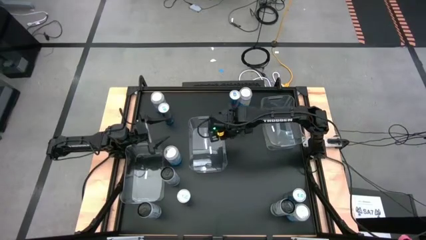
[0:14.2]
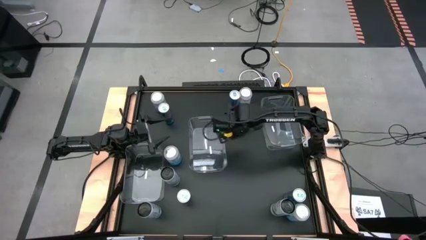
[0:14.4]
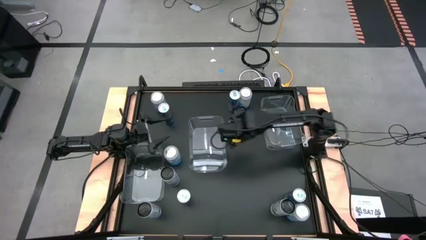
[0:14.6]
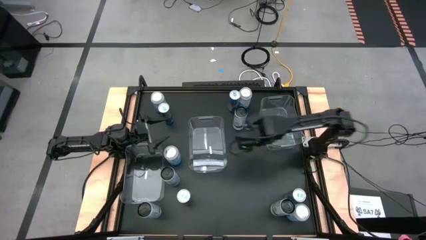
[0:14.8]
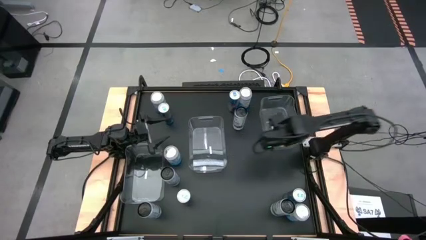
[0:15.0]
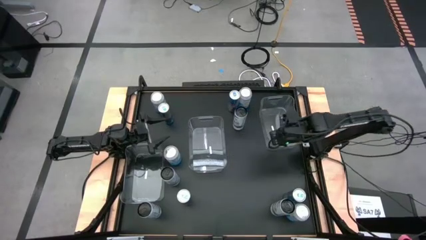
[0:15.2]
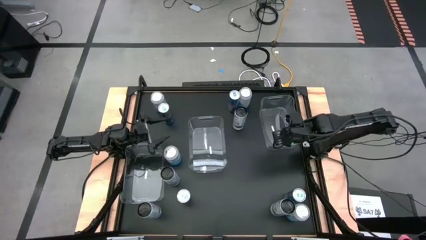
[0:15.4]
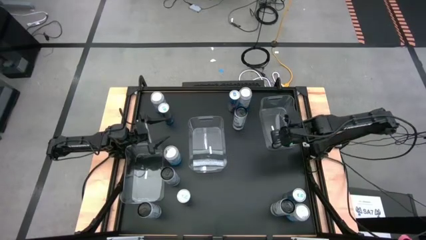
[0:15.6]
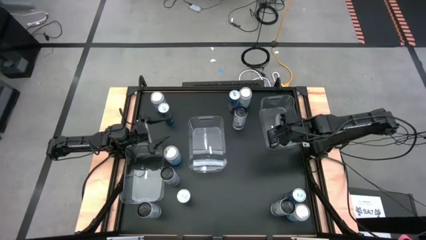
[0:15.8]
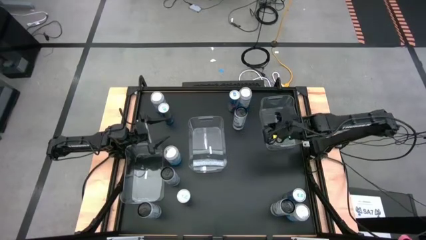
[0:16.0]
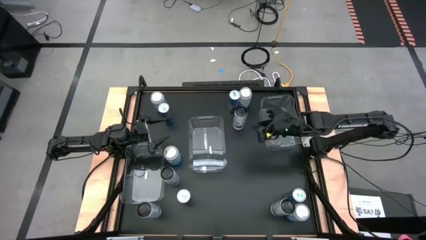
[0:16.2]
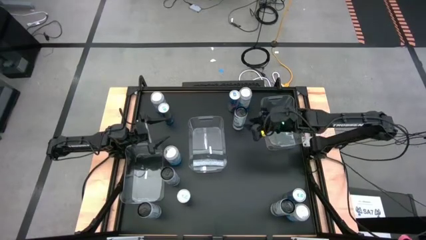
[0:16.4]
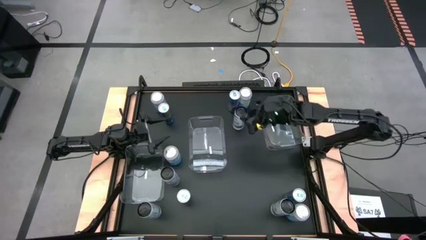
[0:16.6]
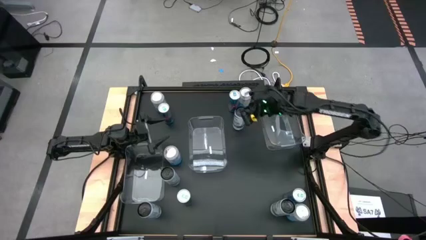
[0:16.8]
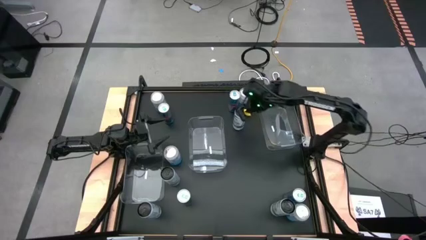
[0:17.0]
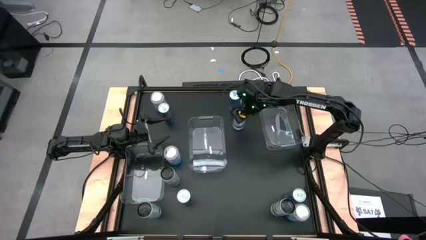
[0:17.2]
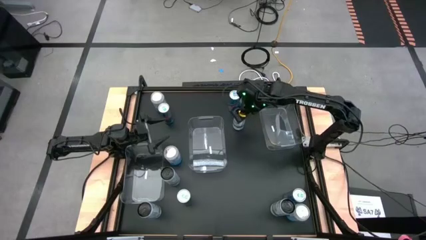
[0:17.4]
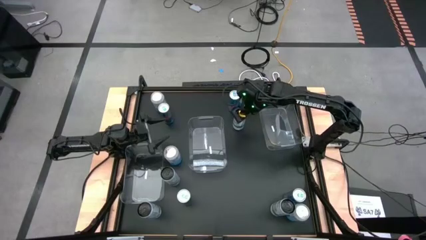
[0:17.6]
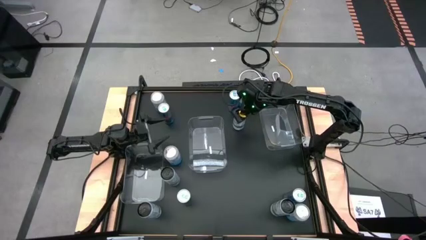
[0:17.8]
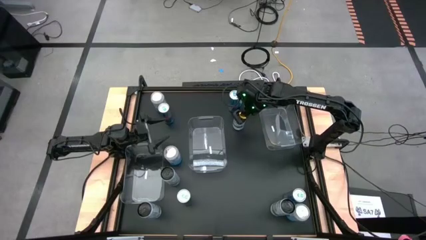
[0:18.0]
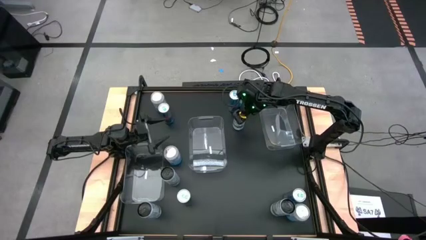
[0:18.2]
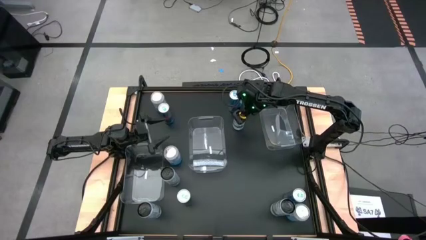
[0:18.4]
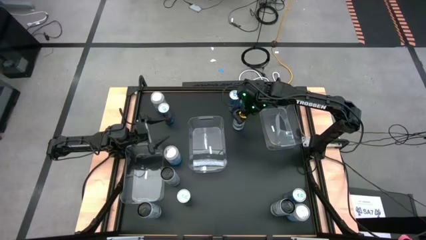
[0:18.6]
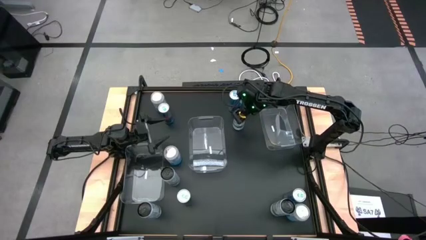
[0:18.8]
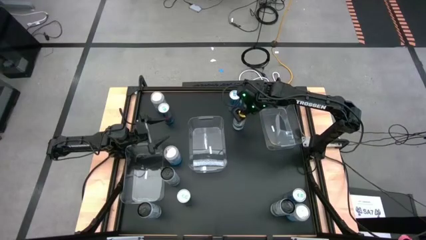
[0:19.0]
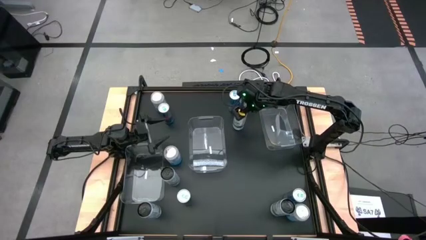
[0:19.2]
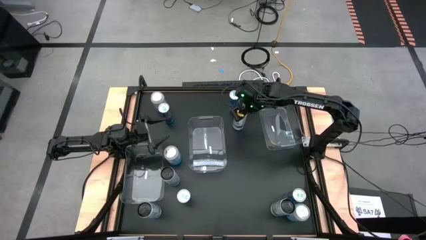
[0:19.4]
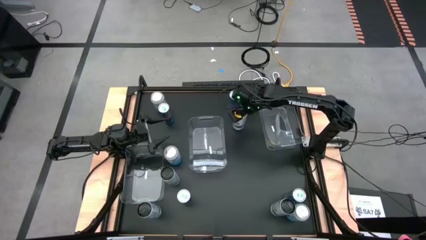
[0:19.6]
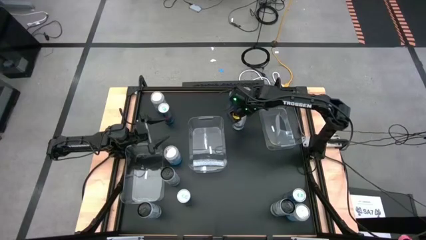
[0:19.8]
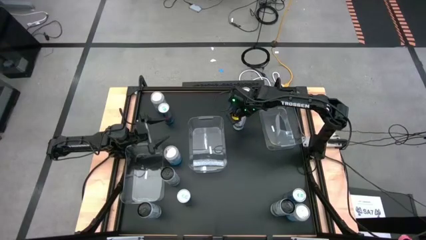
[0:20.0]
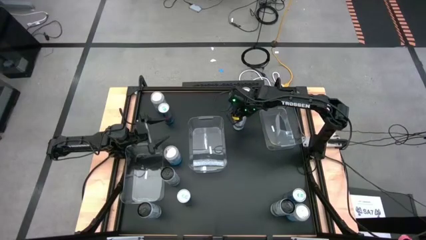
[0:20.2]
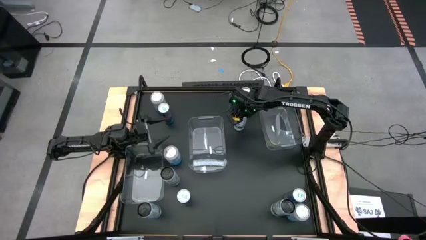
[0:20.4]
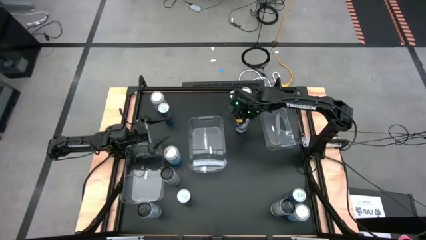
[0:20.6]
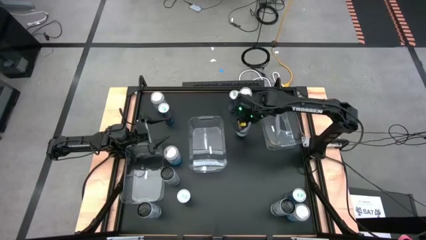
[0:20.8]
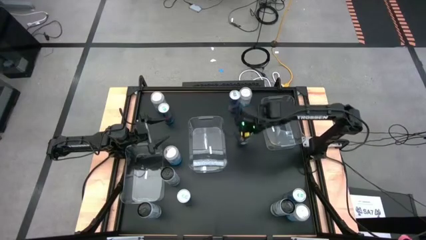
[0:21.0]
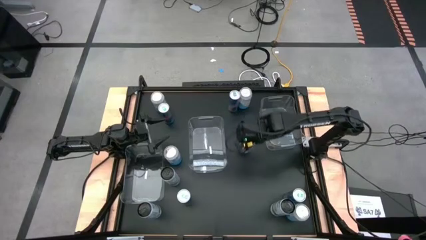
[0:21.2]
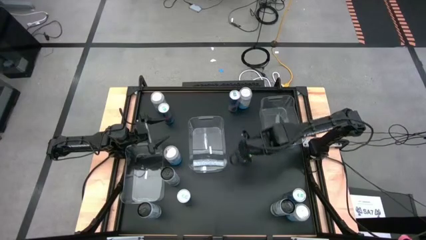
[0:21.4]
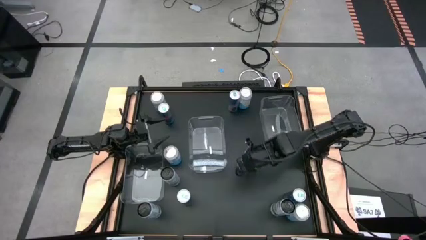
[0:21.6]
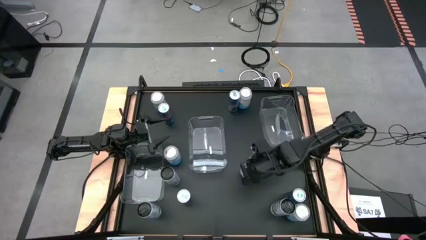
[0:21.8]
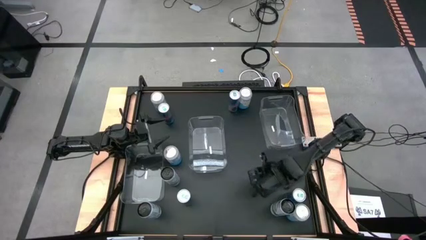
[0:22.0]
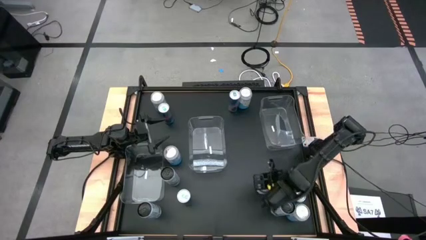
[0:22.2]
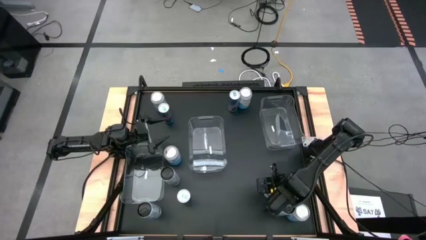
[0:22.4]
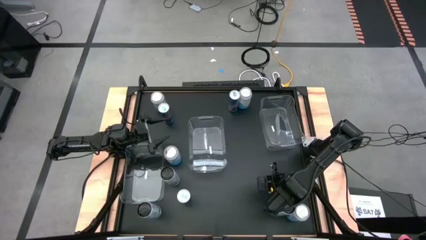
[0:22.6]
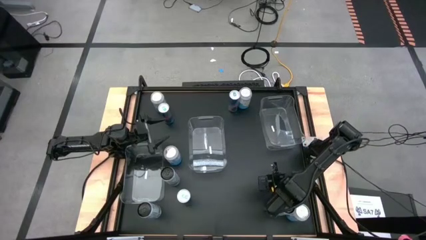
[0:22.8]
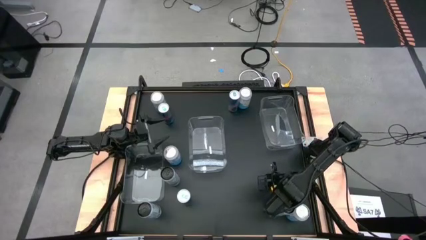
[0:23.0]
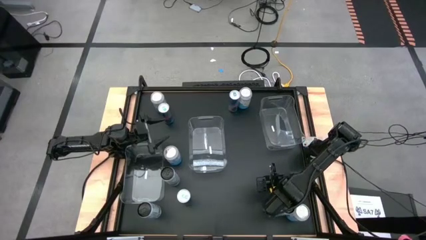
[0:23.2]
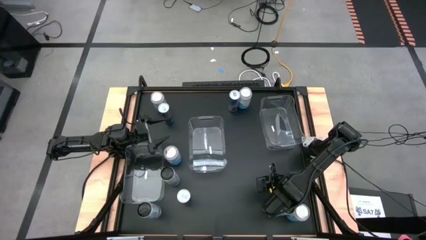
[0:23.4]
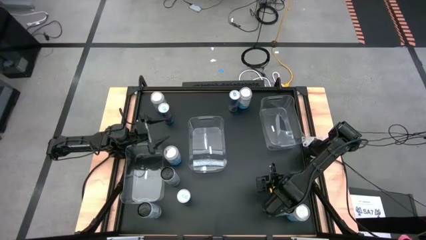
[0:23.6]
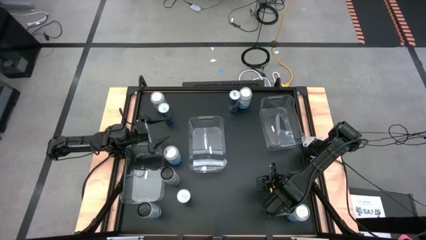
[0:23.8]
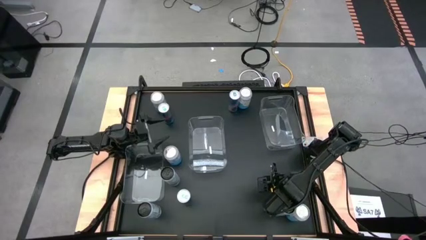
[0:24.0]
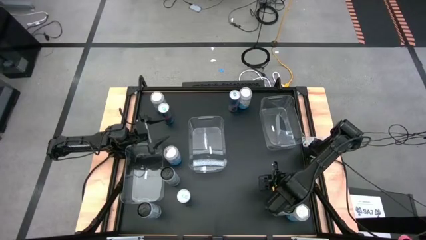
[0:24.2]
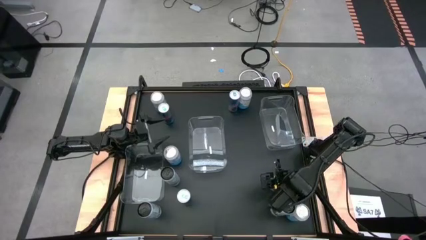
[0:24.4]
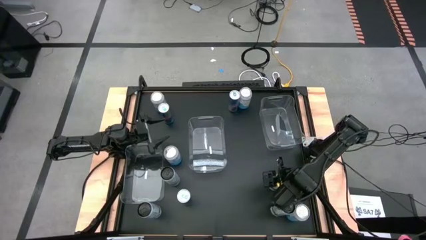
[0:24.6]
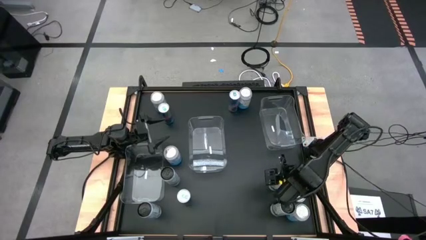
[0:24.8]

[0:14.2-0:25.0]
Task: Sort soda cans
Move the top white soda can to the bottom right of the table
